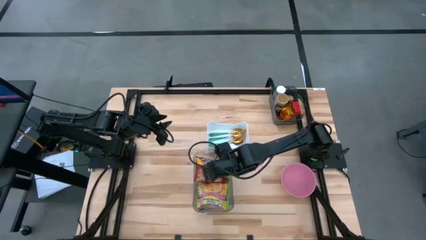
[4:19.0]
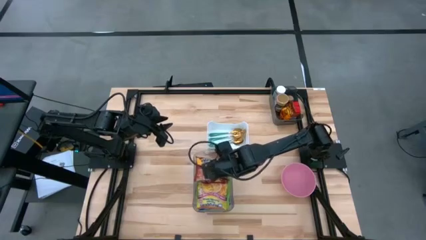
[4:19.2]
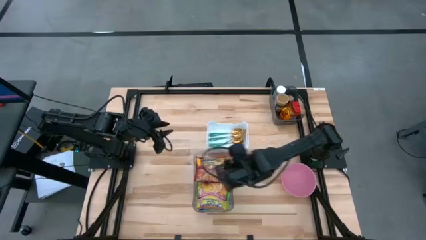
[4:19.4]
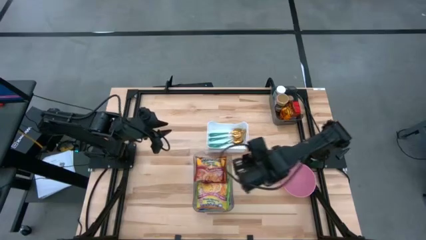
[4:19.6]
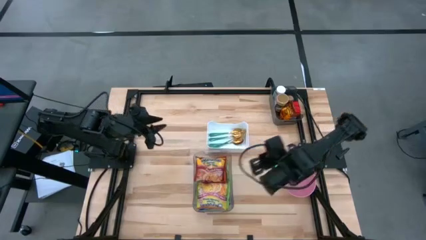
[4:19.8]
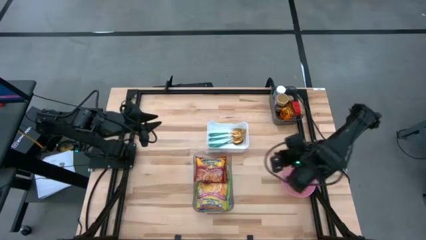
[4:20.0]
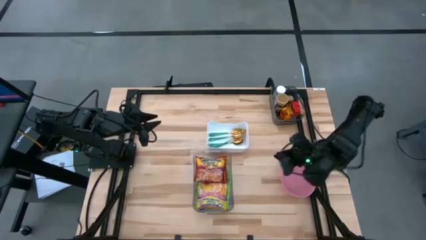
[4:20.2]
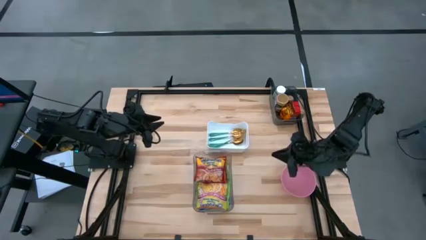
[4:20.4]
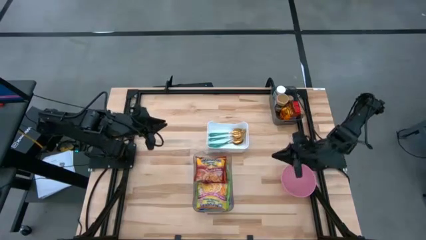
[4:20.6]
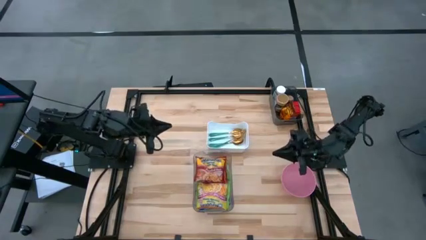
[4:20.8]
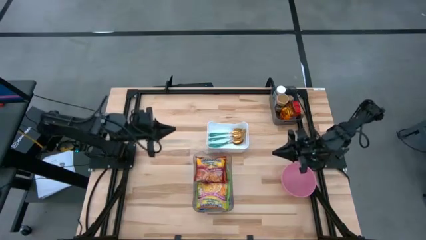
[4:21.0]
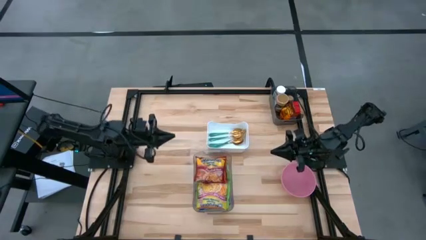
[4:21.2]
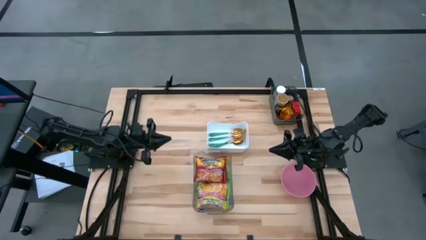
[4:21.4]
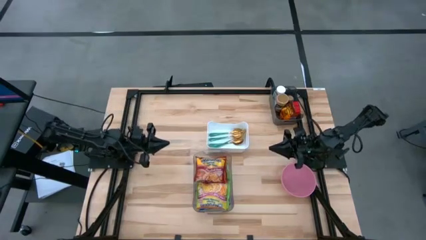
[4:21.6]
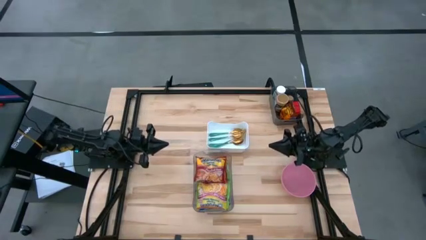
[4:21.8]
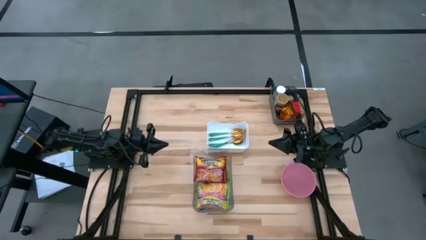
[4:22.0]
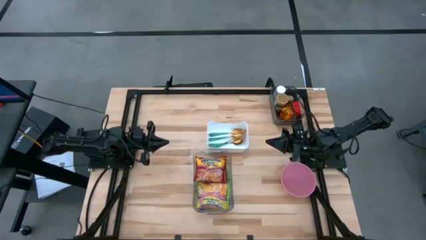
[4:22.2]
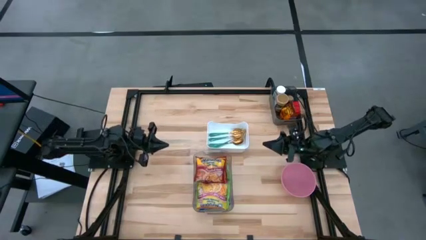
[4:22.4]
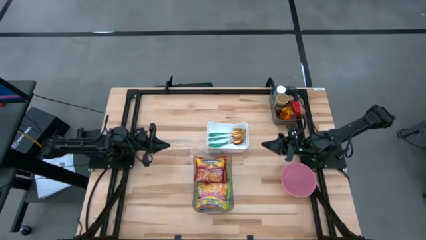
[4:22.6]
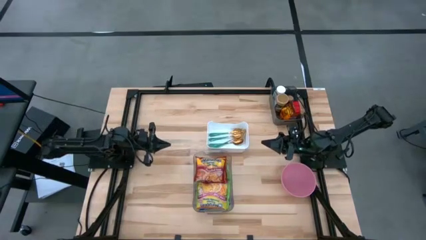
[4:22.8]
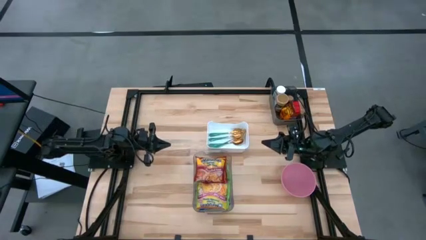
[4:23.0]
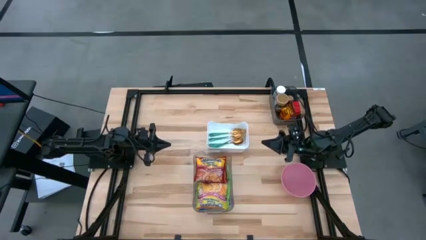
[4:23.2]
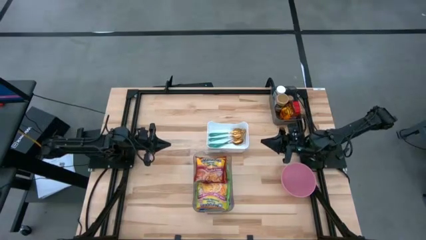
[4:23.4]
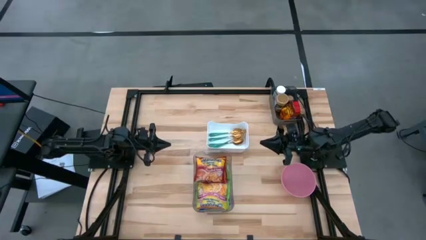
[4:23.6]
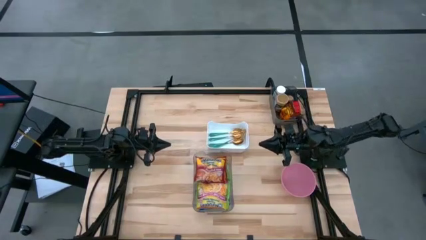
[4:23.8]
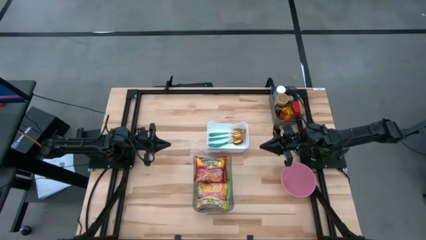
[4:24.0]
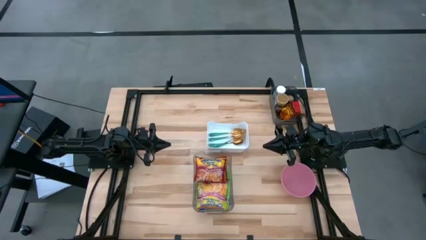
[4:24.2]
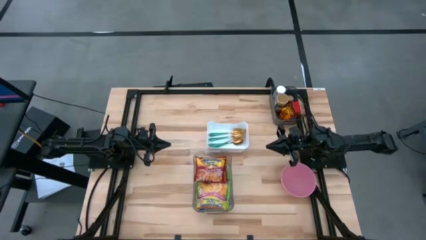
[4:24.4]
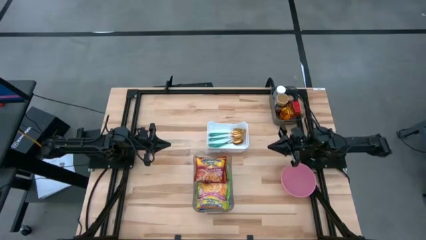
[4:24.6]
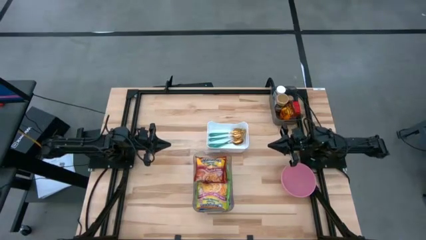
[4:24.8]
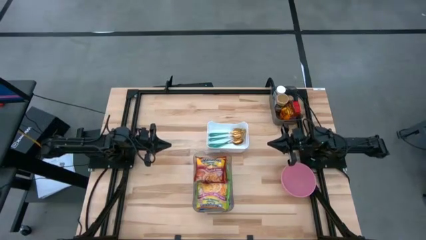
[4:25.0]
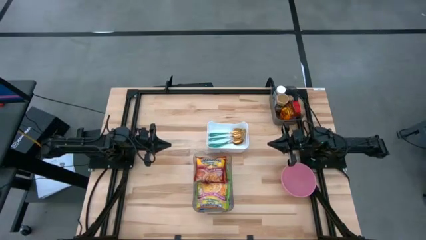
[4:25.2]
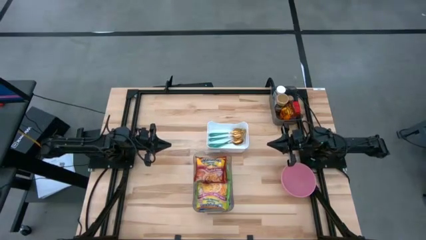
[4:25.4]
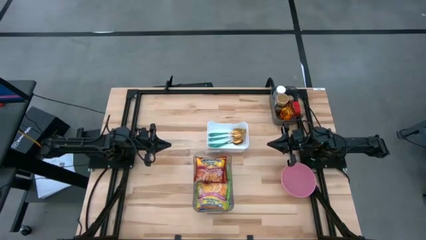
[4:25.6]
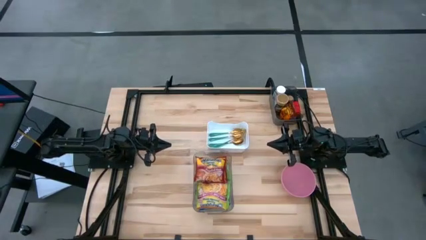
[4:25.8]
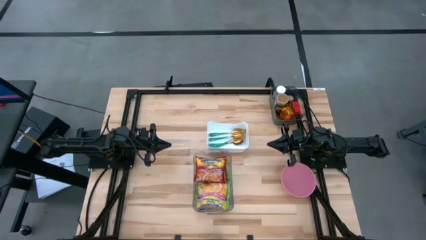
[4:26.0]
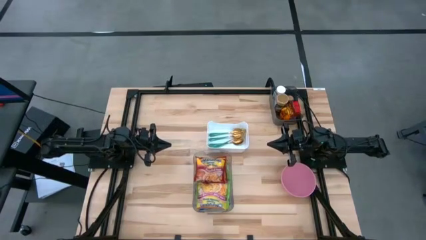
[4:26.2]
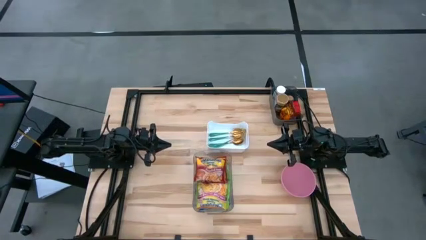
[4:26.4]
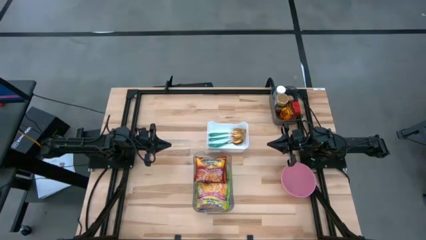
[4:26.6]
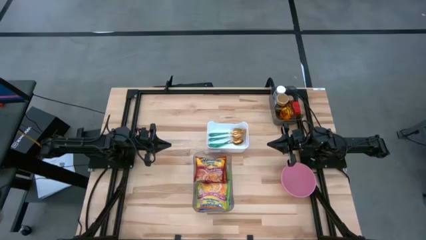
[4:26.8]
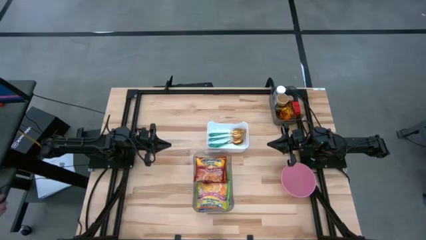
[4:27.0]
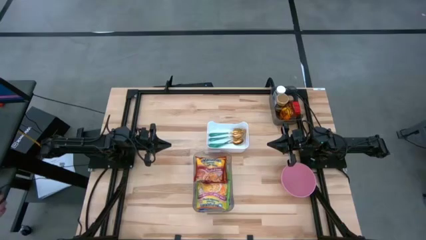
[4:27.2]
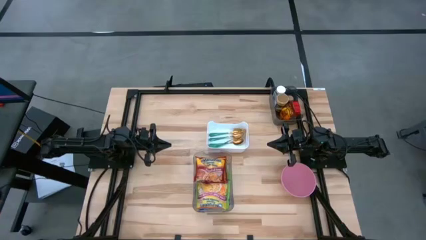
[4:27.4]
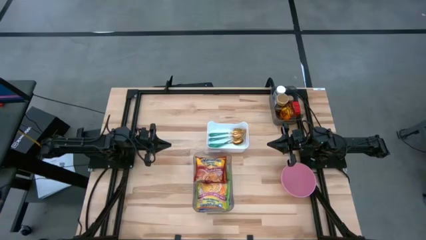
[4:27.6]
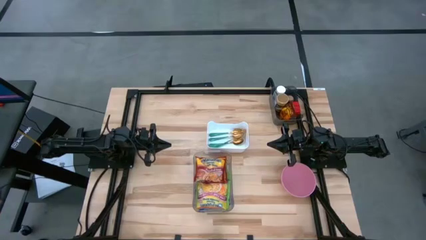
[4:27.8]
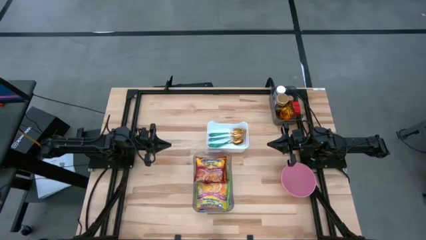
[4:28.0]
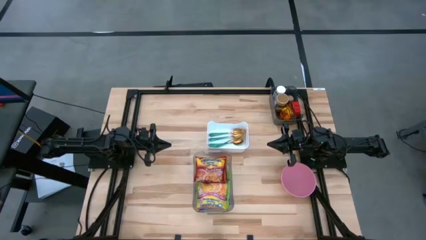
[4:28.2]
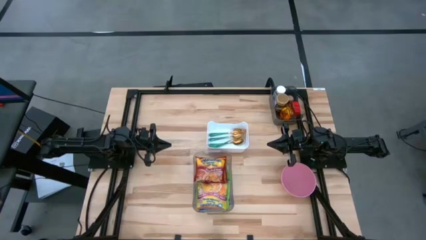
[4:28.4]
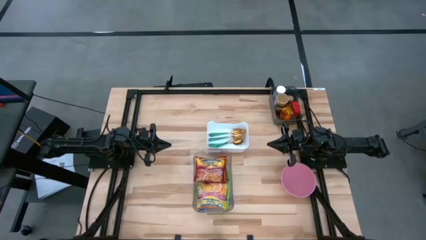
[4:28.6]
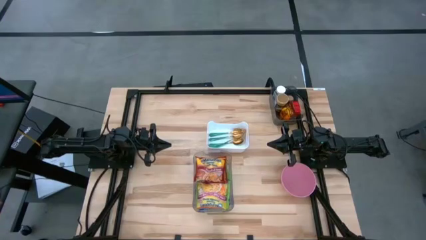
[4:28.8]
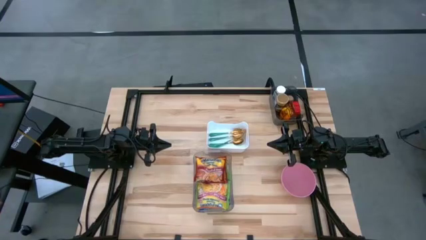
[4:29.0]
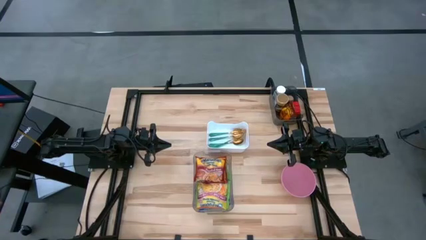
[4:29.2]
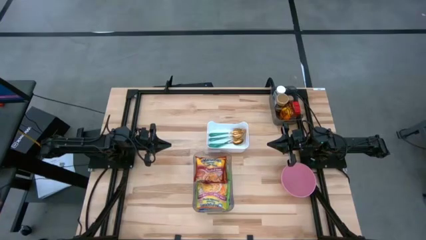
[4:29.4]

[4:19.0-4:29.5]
Task: Pick & Place Food Item
Return to Home Position
